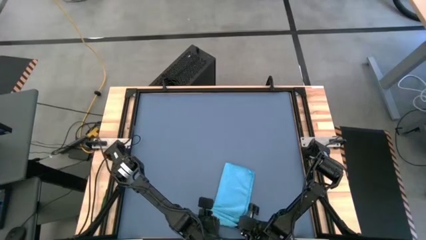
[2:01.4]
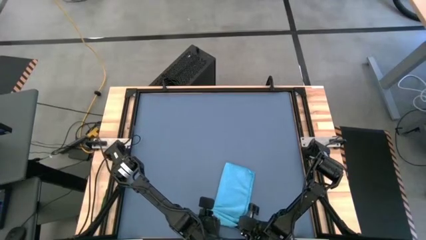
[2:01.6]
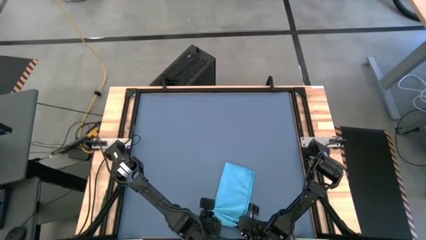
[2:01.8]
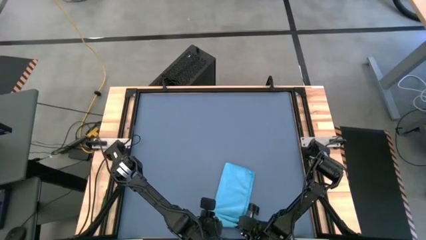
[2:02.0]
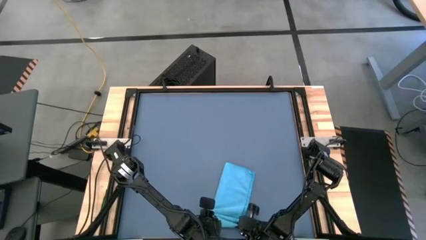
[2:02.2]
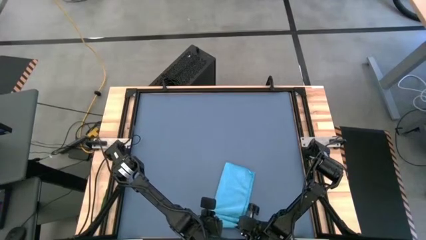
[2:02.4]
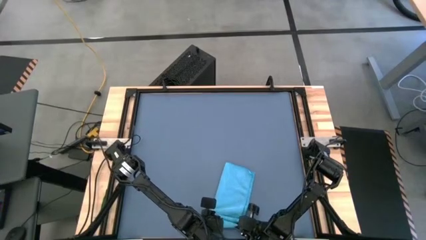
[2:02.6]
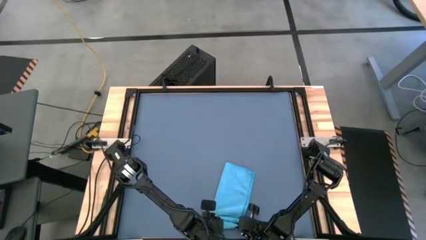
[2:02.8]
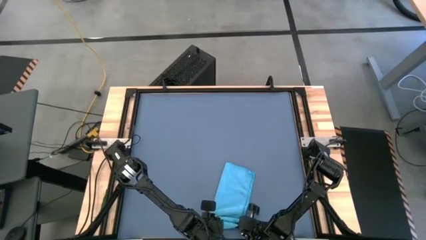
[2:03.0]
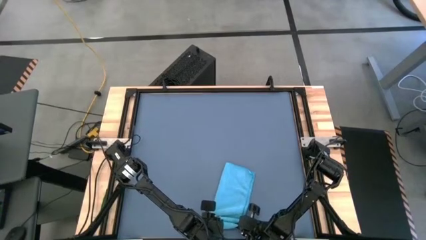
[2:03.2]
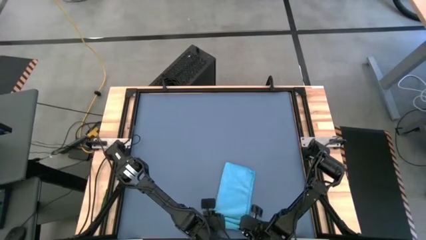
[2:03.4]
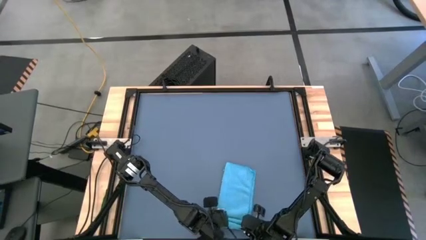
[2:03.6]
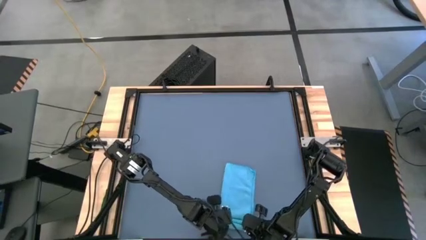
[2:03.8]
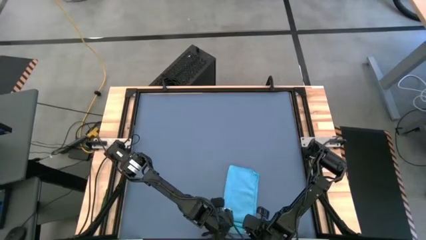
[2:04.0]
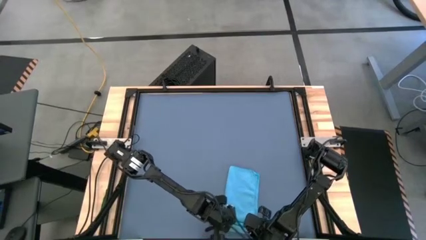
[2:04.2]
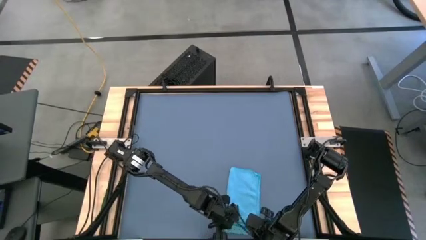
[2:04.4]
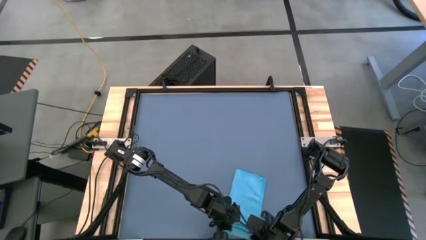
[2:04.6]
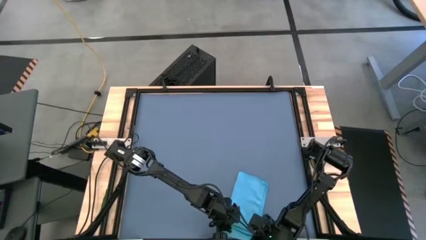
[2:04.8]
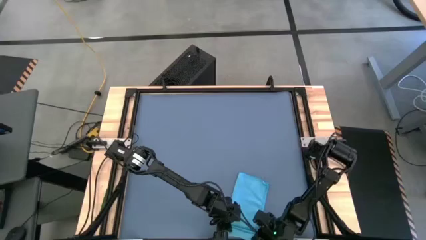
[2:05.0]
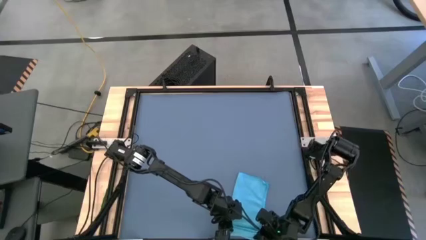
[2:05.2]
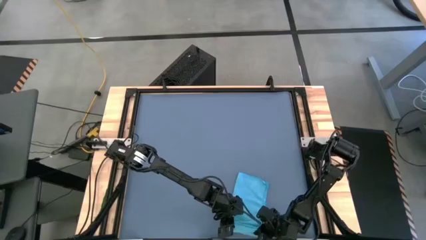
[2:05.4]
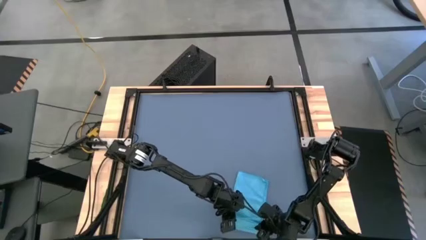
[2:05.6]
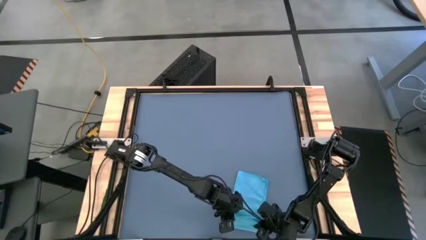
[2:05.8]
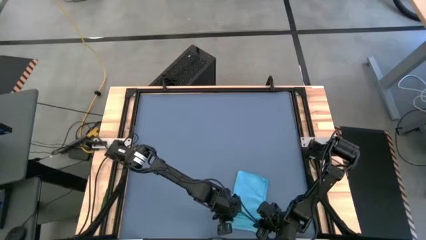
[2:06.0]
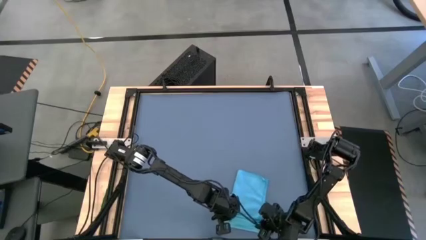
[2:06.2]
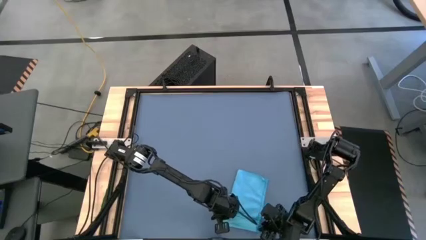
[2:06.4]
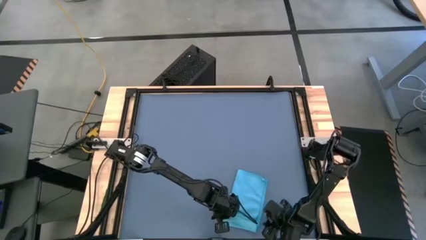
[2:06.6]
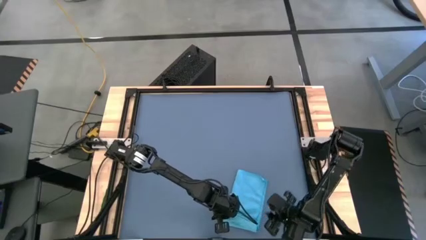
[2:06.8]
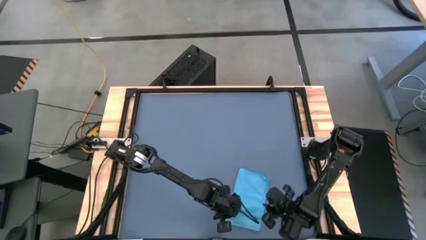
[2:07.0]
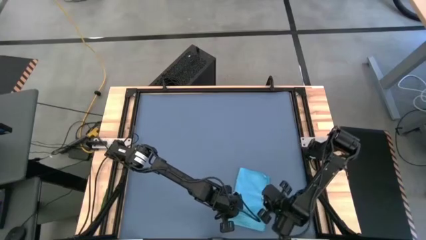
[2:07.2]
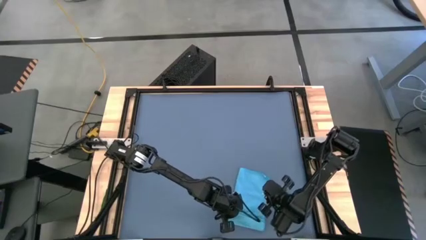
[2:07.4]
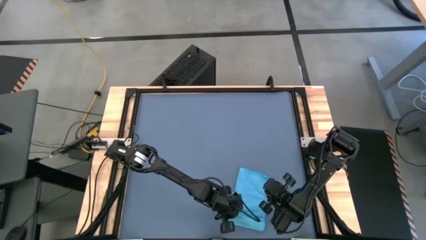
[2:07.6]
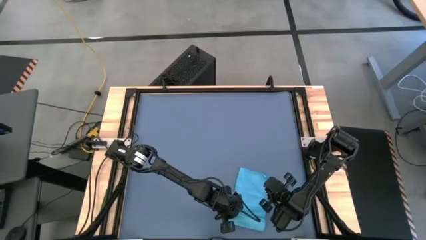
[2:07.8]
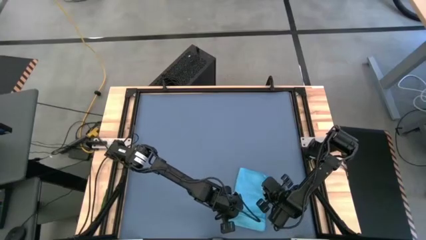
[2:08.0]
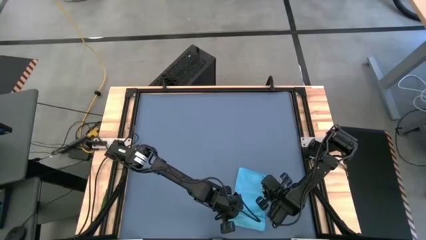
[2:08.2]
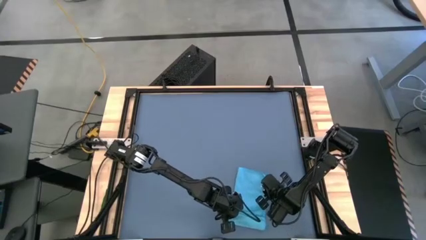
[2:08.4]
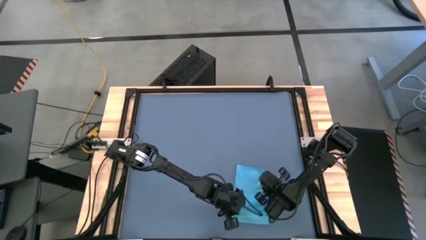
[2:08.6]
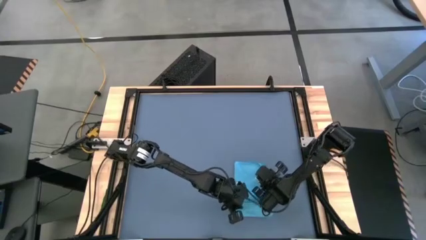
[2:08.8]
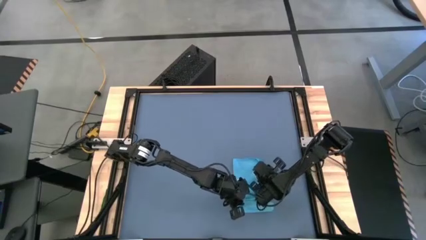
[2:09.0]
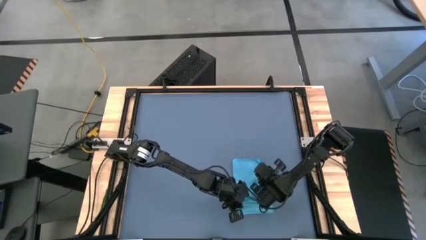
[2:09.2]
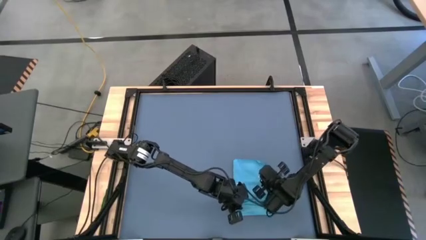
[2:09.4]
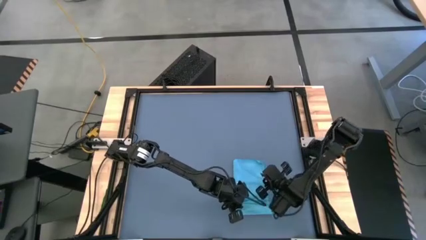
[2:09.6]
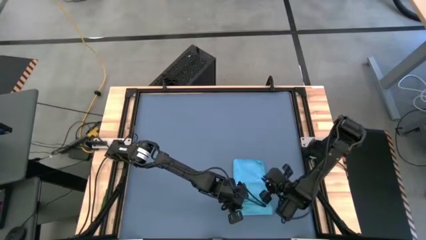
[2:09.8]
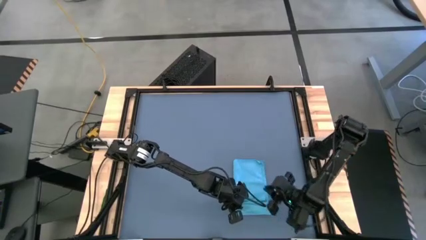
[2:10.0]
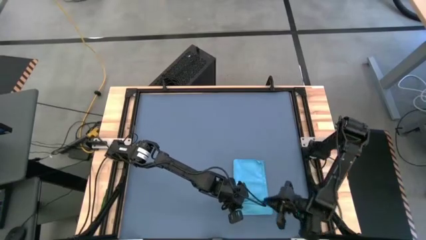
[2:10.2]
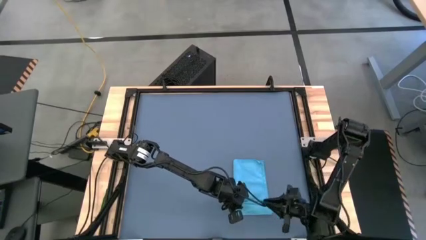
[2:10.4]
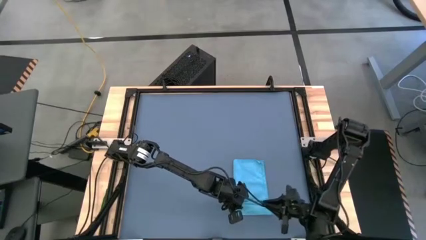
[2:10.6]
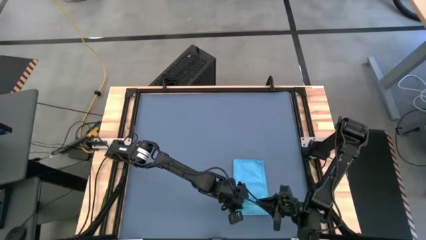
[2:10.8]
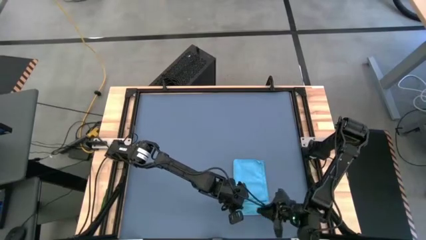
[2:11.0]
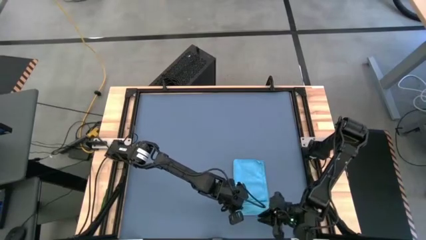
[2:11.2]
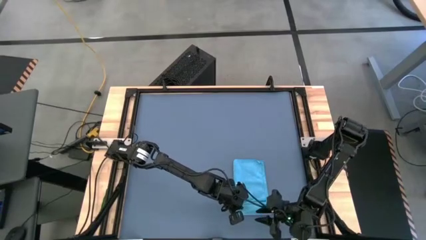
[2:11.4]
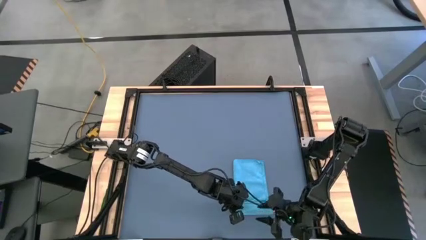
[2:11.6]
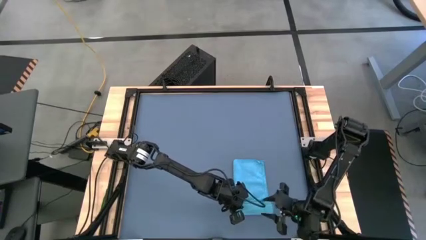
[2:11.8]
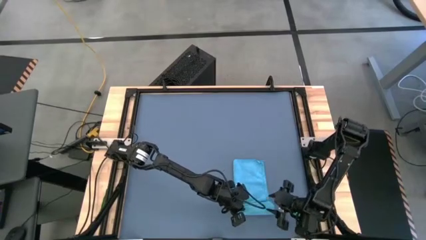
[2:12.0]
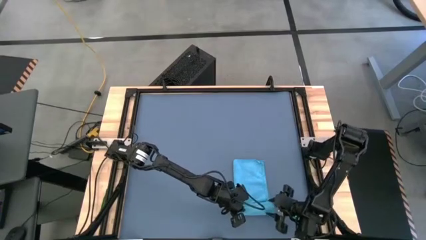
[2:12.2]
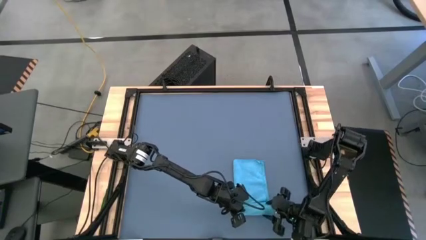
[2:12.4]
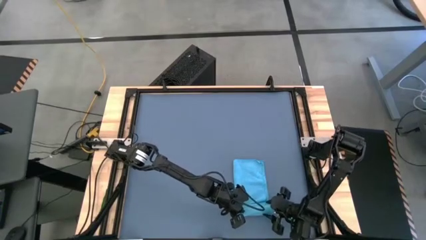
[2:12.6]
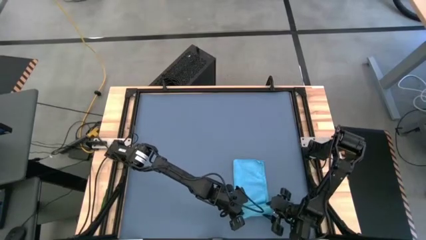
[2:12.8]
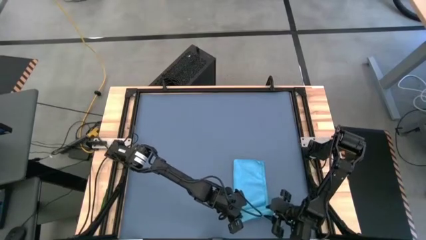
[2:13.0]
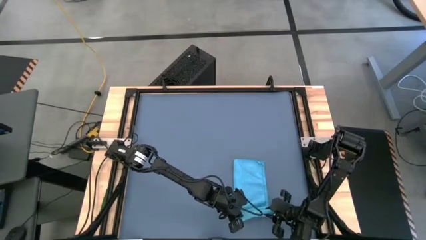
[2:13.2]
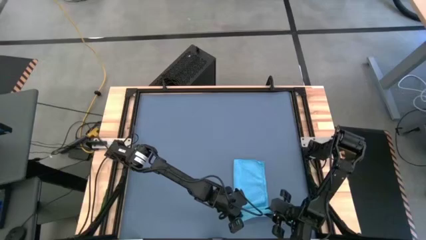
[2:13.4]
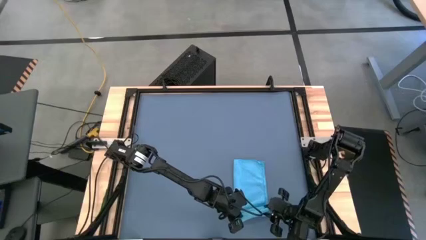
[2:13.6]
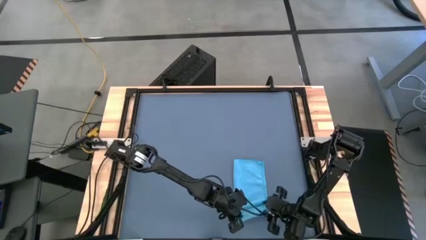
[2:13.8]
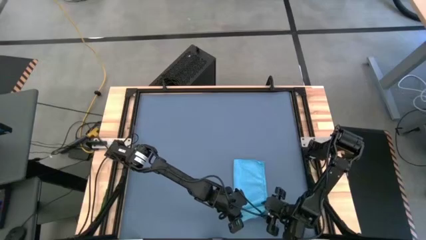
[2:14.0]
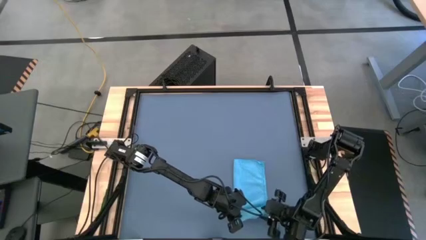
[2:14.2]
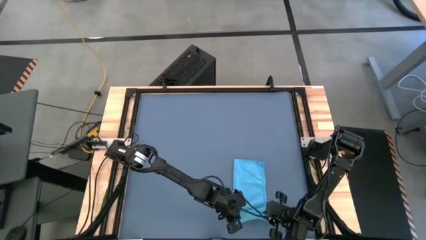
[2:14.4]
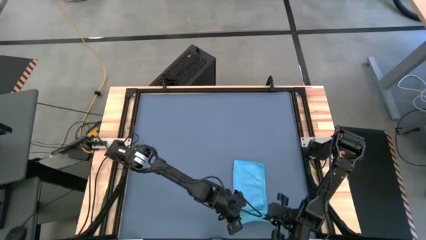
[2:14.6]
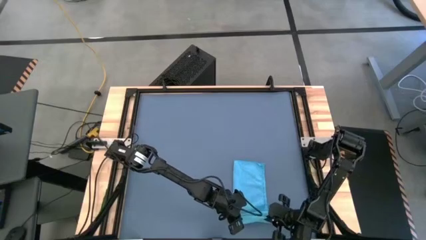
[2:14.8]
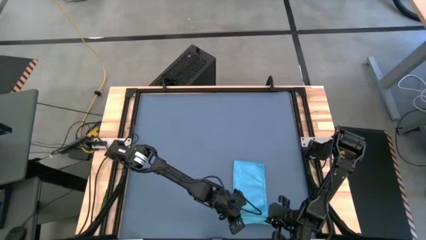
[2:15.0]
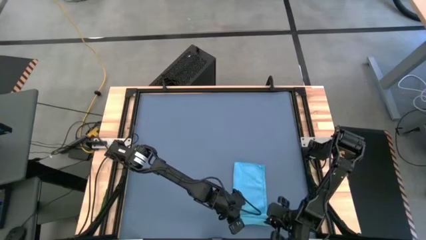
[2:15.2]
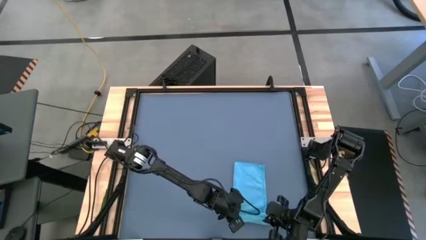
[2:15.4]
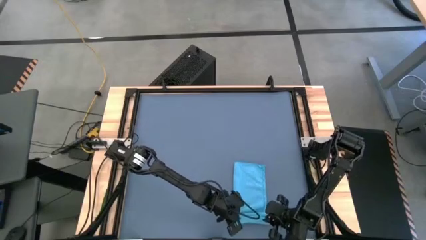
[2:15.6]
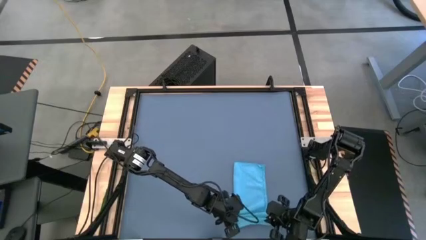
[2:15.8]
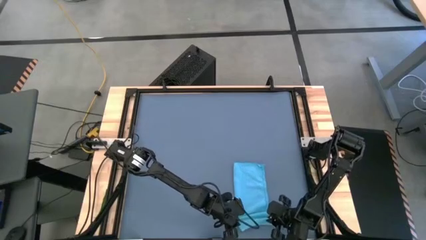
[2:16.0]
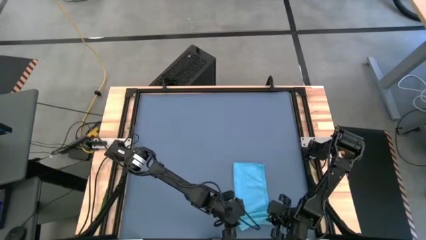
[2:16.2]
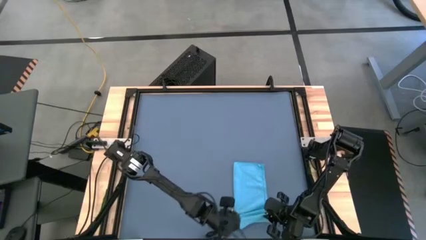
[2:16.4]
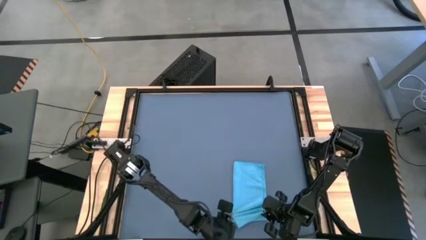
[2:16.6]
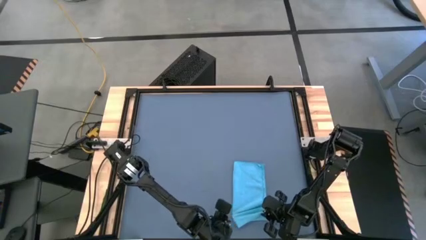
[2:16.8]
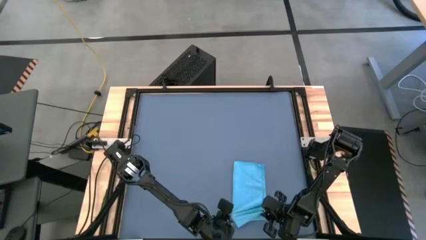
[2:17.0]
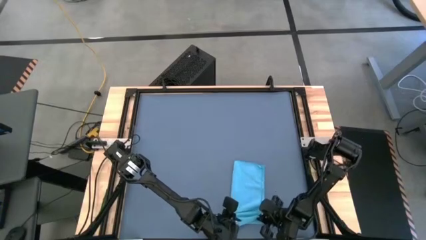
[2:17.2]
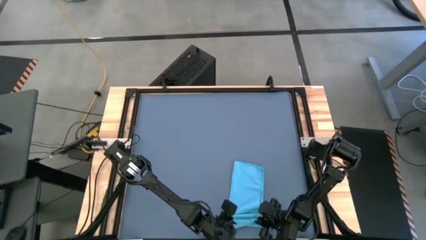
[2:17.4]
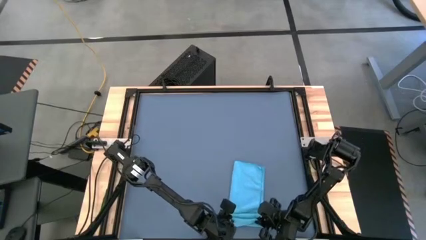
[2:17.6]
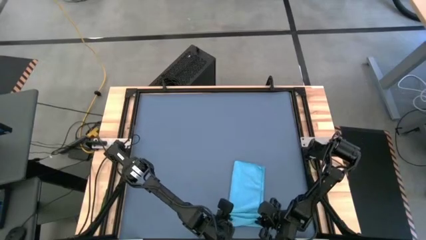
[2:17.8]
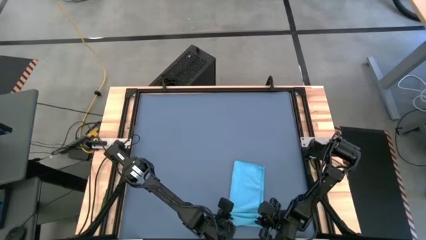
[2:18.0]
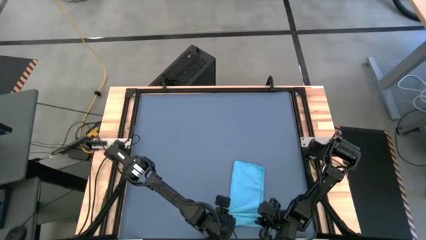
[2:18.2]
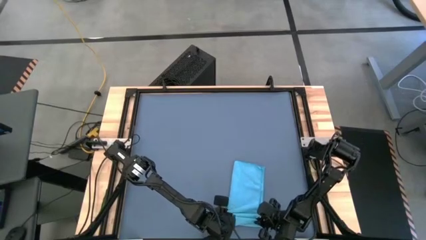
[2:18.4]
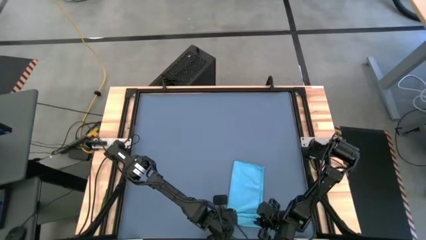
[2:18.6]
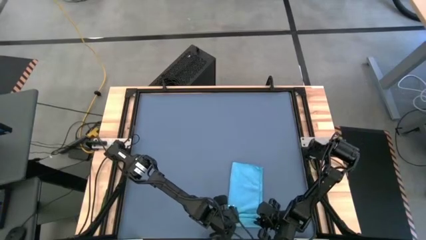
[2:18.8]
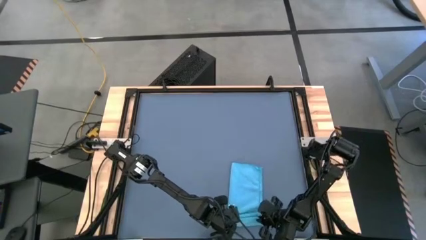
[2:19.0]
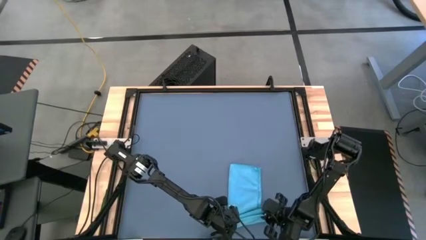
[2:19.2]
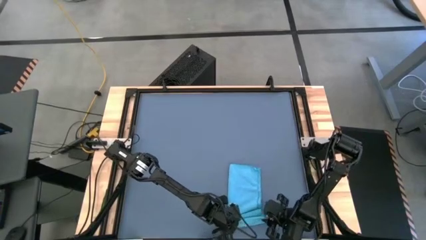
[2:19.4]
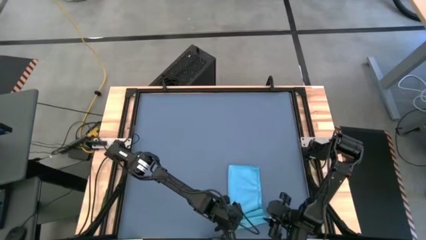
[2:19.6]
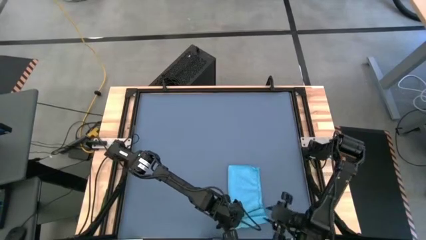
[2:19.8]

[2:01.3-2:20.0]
Task: Roll towel
Roll the blue microfiber towel
